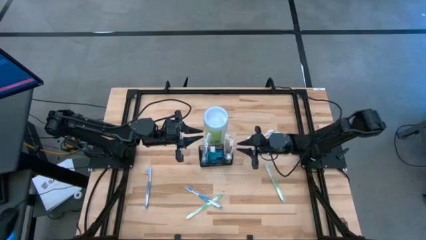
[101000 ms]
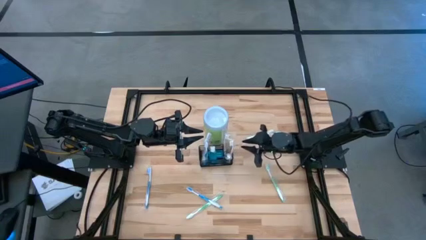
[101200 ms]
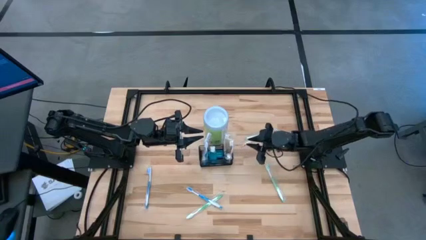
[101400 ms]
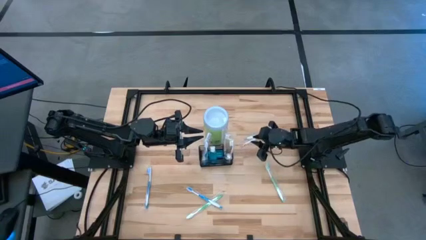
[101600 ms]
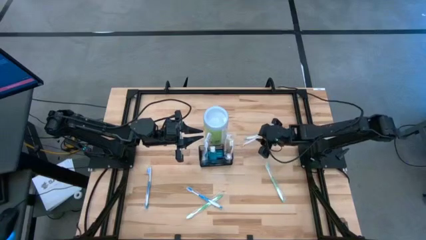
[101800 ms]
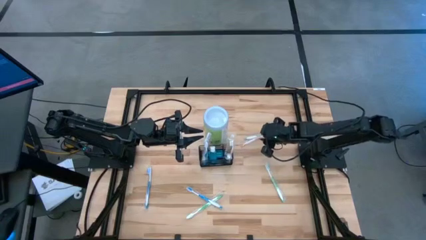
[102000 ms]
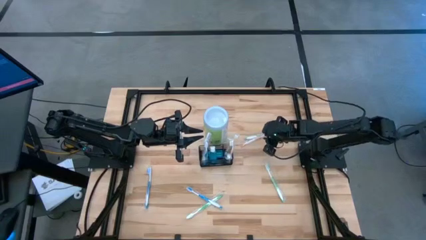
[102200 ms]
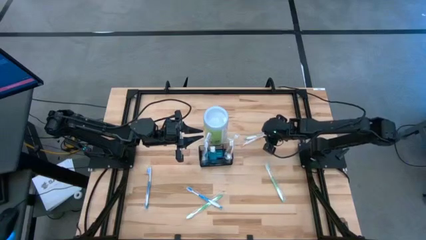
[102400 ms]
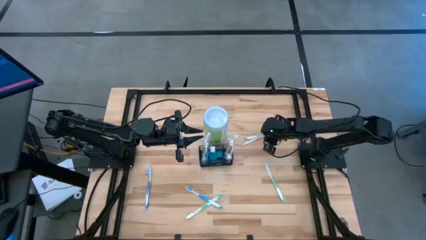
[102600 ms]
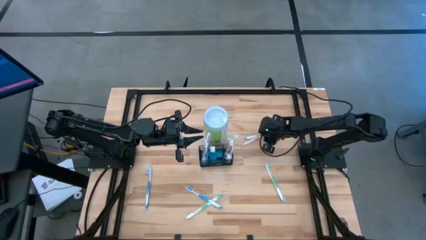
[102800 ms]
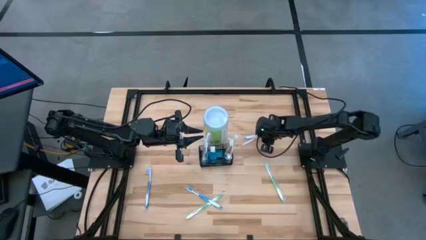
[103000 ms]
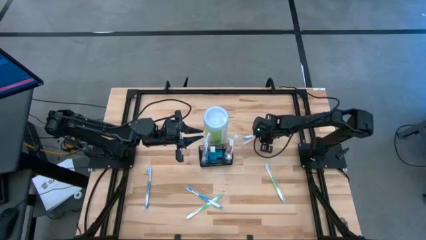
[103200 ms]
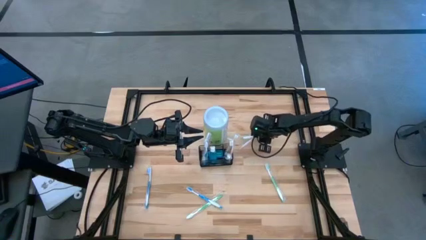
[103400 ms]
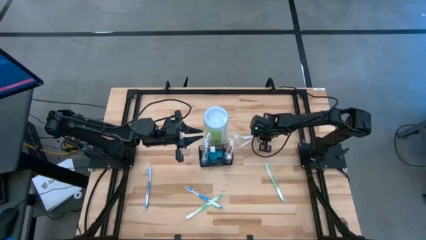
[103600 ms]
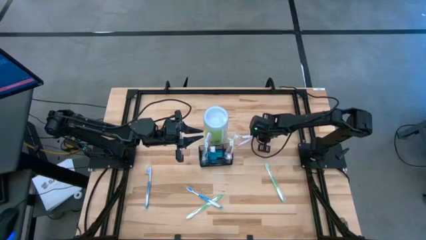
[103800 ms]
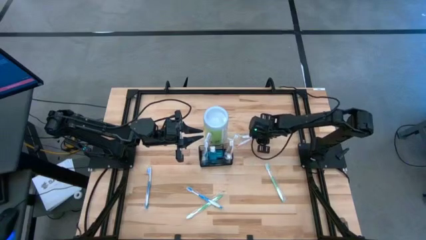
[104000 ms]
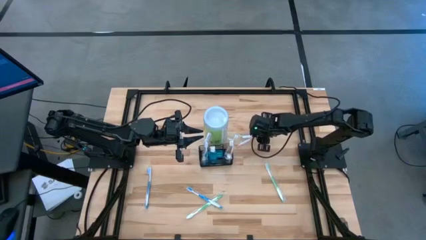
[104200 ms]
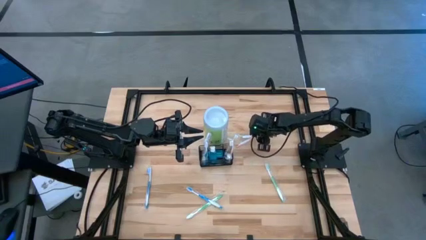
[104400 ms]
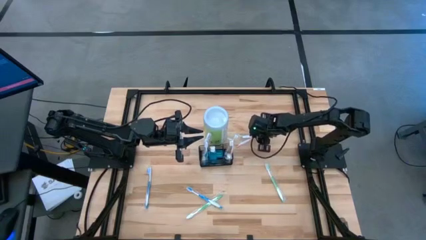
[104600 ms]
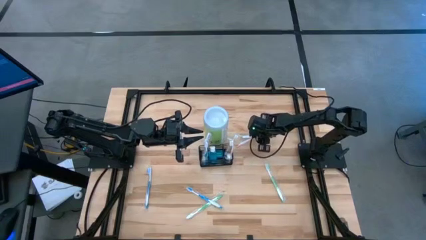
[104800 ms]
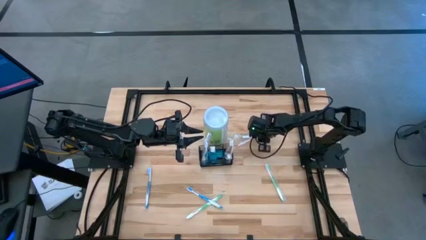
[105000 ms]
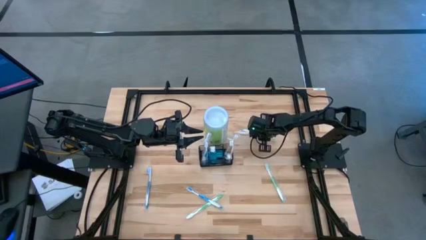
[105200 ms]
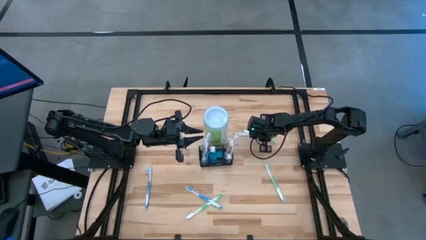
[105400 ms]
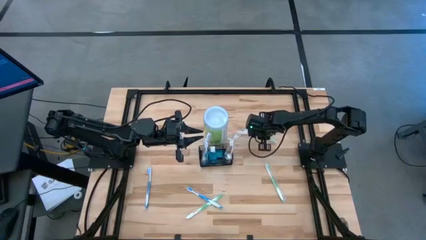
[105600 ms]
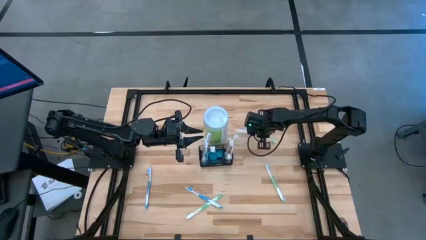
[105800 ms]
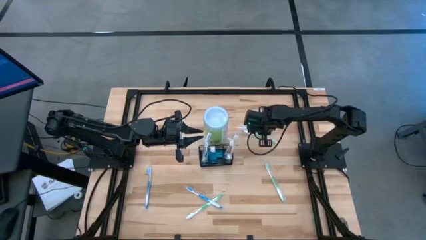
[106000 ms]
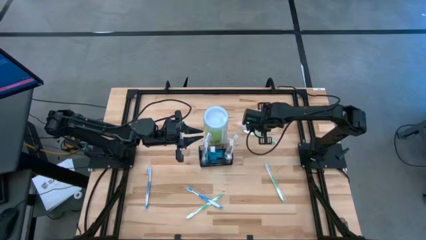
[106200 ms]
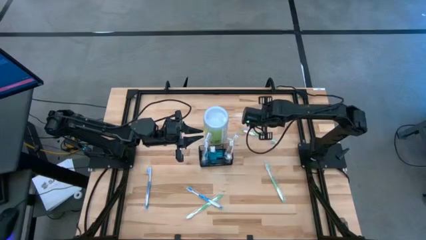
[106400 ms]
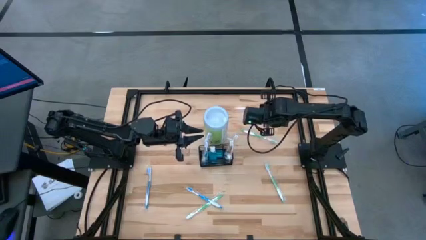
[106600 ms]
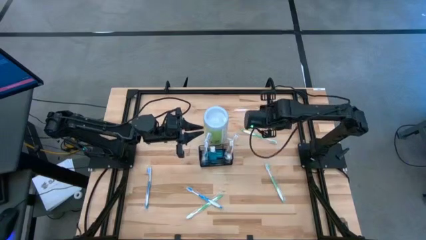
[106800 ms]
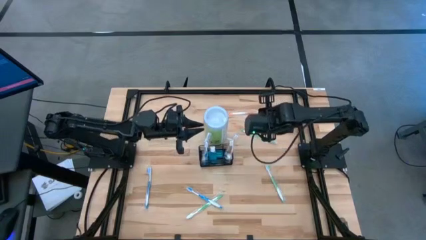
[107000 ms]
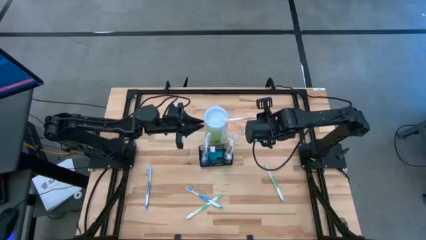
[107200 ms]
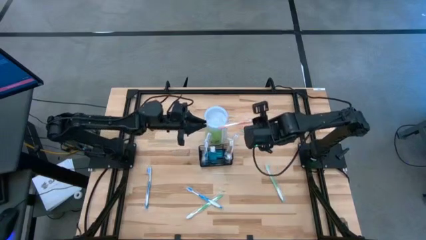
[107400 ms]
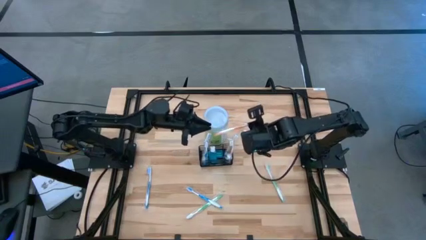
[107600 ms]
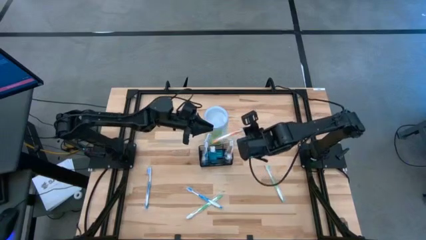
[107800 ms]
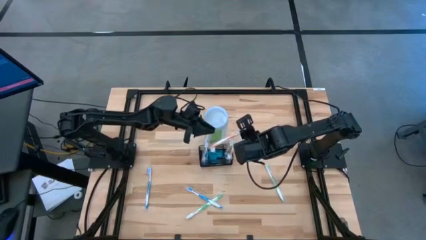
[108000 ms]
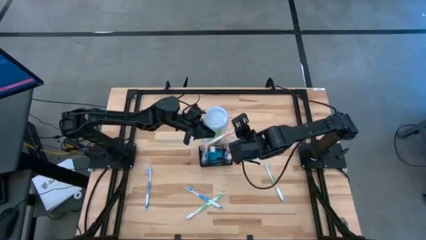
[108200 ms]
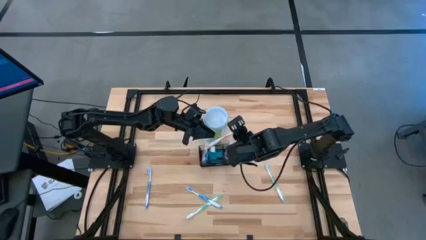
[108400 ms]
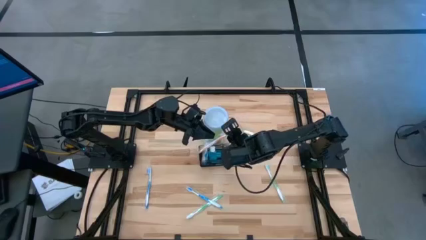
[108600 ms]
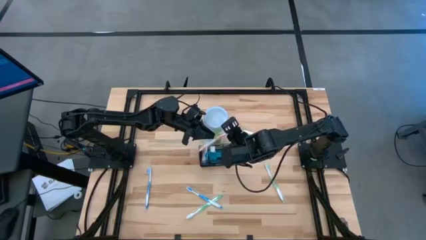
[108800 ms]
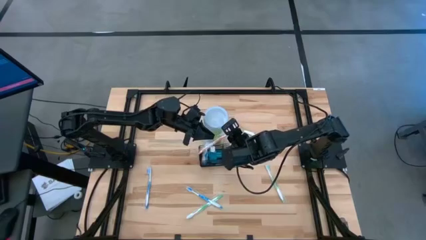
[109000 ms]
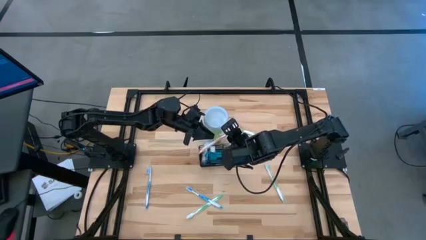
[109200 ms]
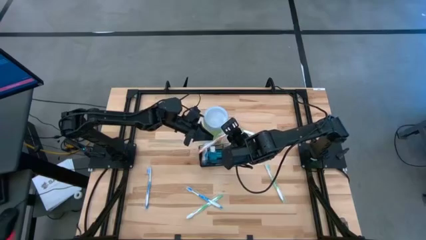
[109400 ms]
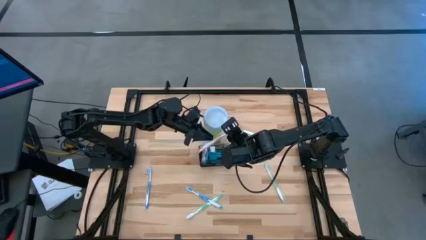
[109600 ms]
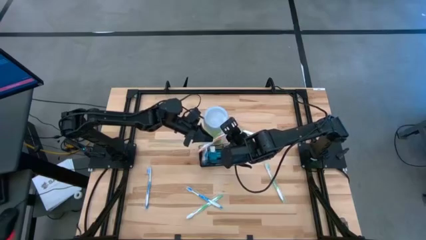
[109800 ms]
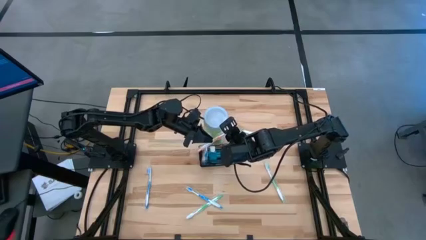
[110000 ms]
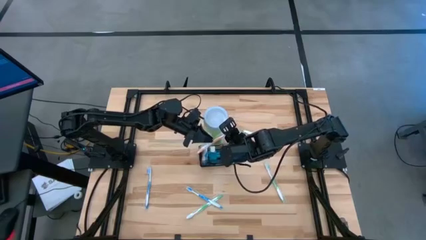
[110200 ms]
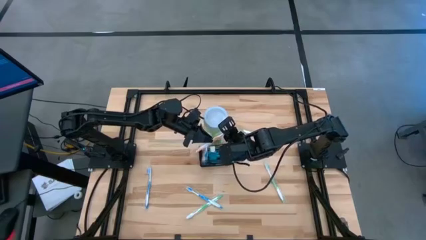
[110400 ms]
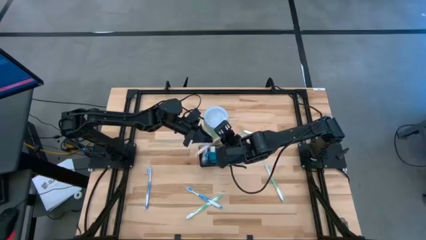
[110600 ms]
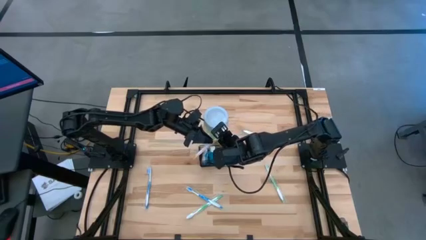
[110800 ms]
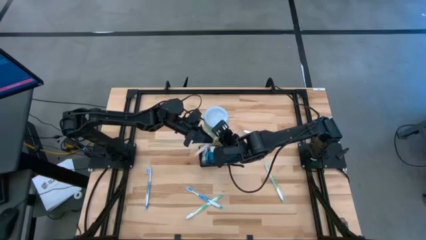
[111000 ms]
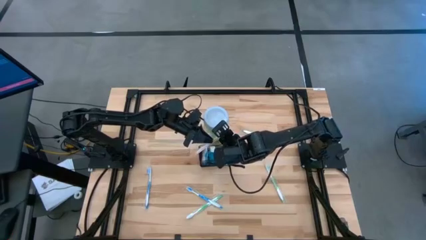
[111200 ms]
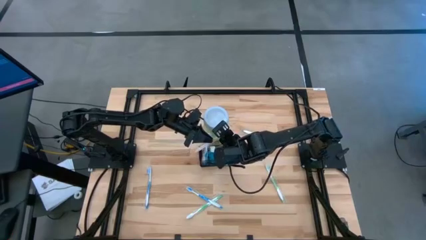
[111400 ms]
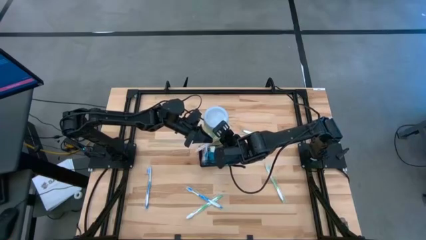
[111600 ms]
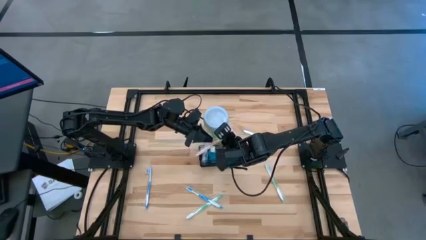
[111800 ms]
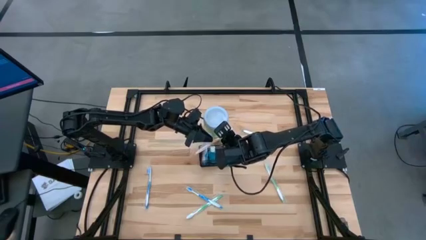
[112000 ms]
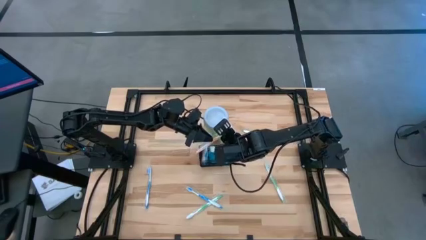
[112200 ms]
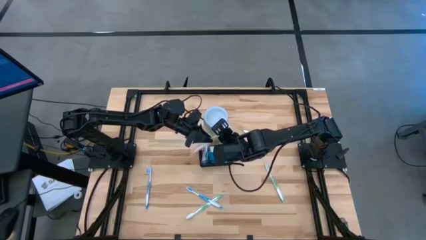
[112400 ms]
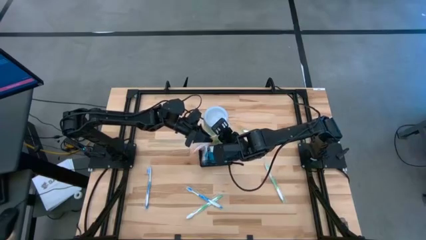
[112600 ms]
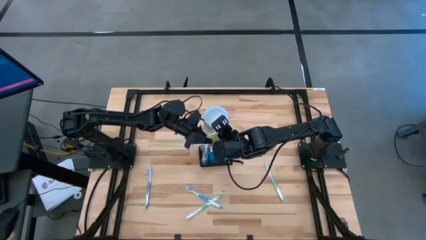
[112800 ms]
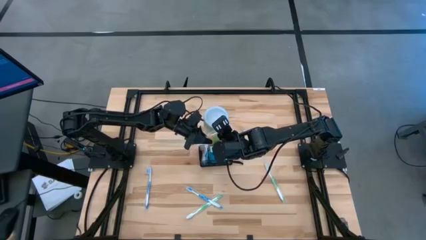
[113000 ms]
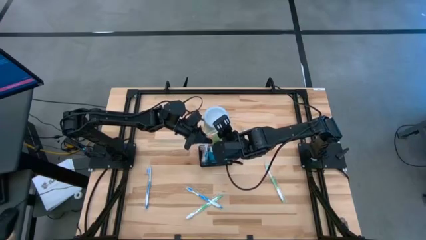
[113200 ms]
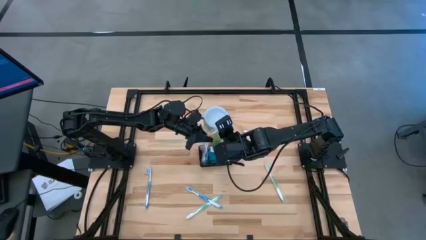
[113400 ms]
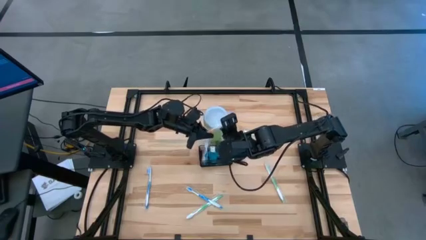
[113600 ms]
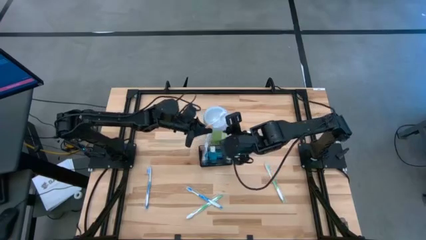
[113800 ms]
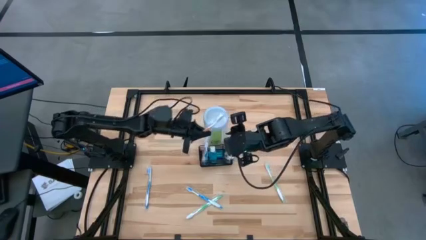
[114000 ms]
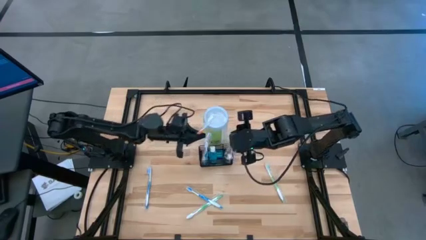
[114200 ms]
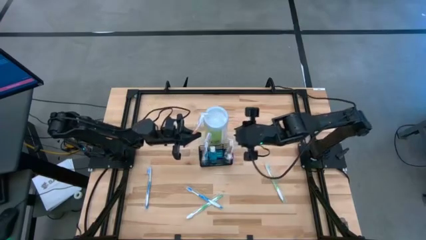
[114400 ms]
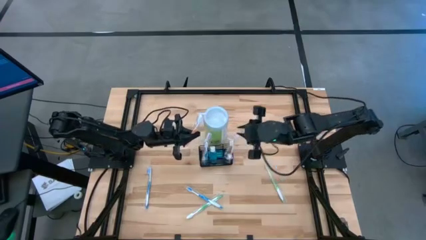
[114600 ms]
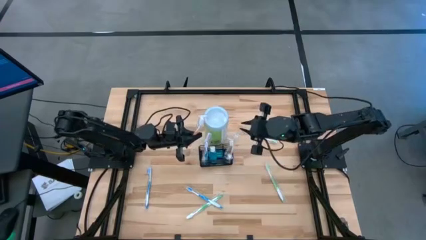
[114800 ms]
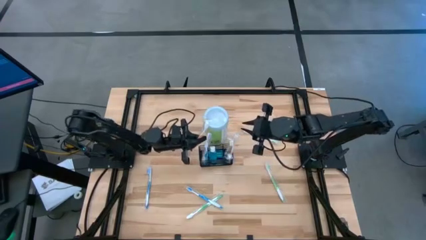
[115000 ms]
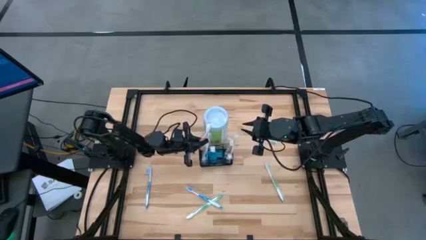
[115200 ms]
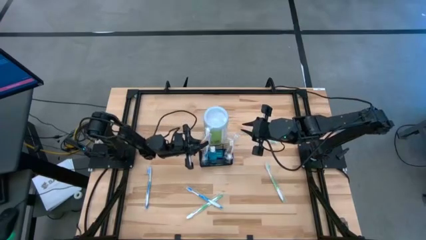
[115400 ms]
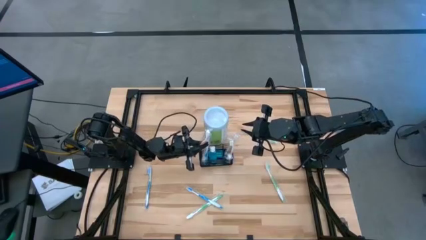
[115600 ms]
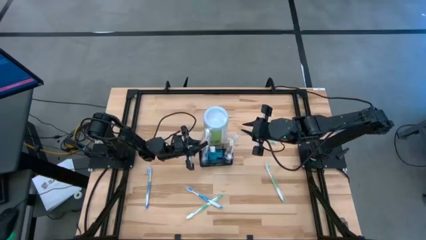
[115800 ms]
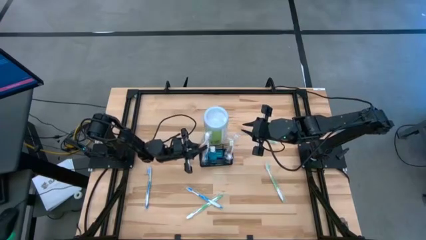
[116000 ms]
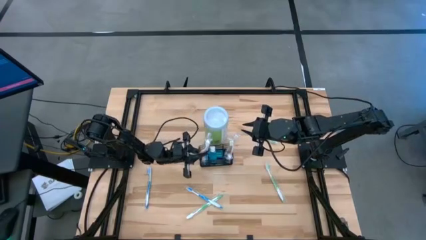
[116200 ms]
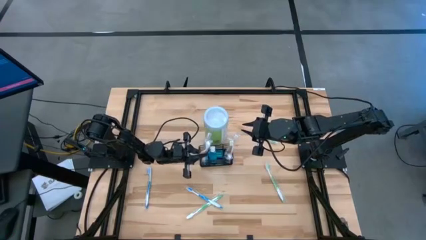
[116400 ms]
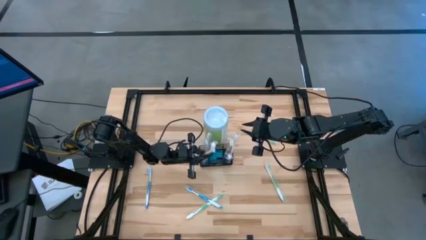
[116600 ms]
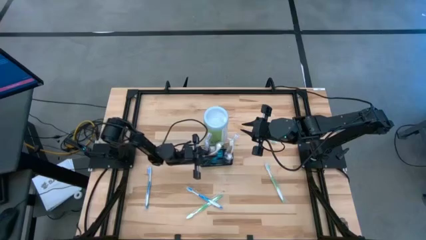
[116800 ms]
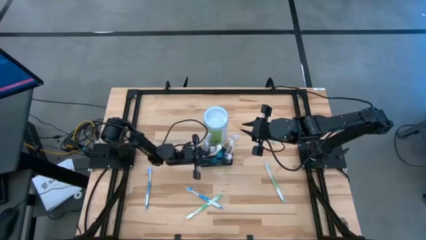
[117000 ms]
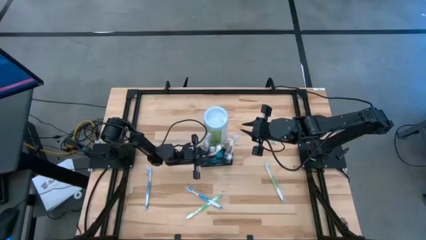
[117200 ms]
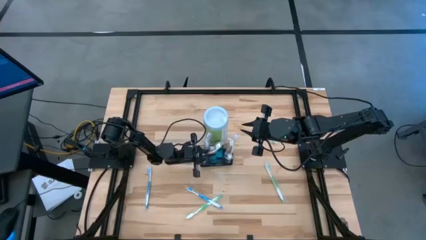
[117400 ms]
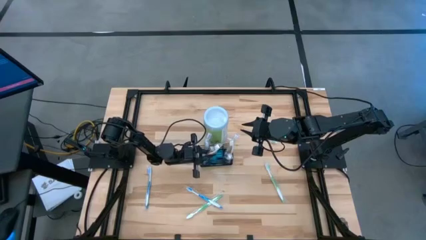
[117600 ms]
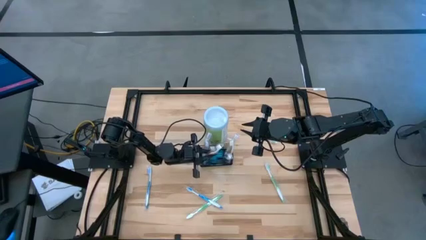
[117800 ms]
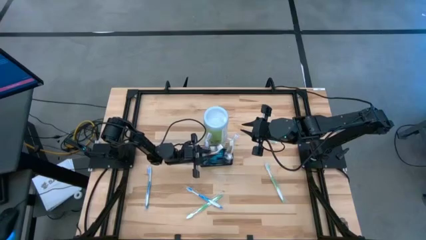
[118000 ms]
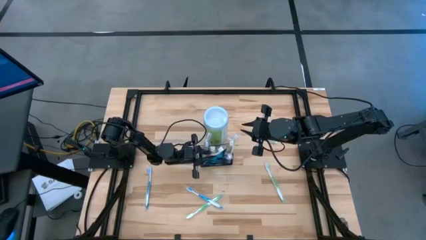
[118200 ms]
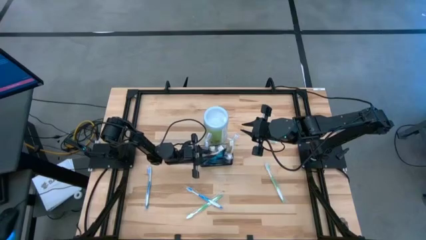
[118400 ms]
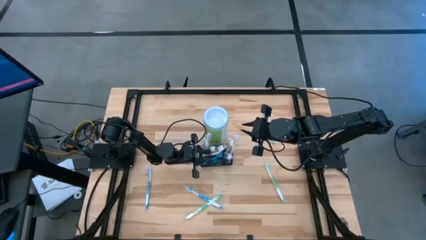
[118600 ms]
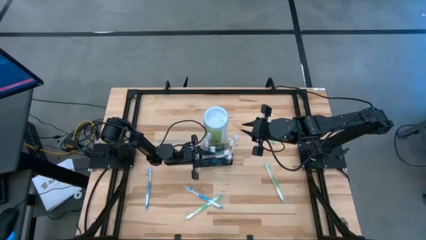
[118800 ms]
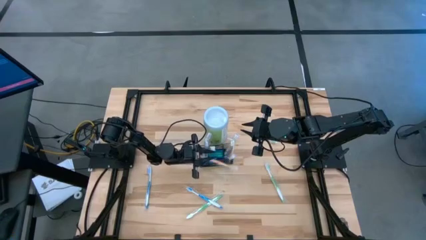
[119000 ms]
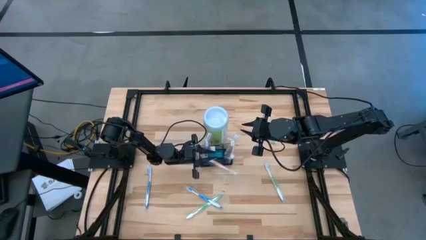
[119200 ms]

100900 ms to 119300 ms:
Task: Pick & Place toothbrushing station
Put the orange toothbrush into the wire organizer
